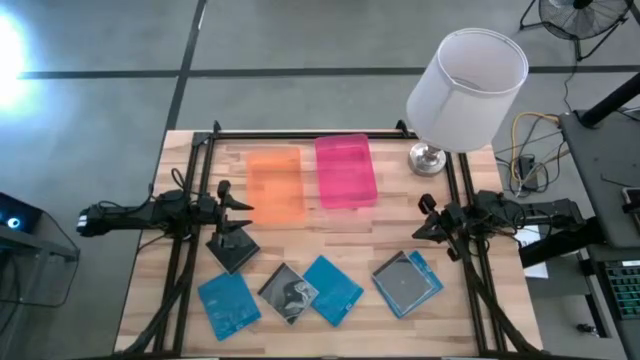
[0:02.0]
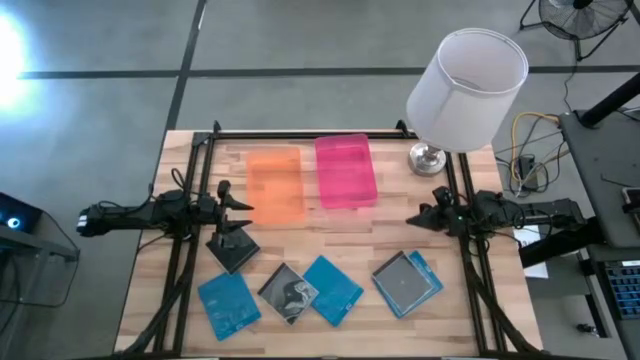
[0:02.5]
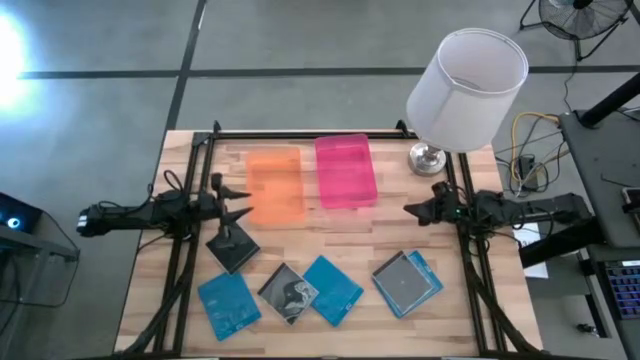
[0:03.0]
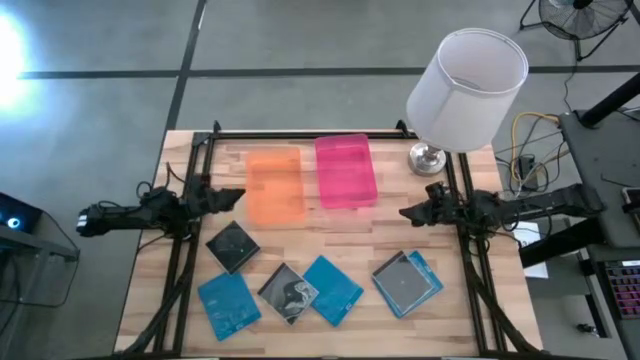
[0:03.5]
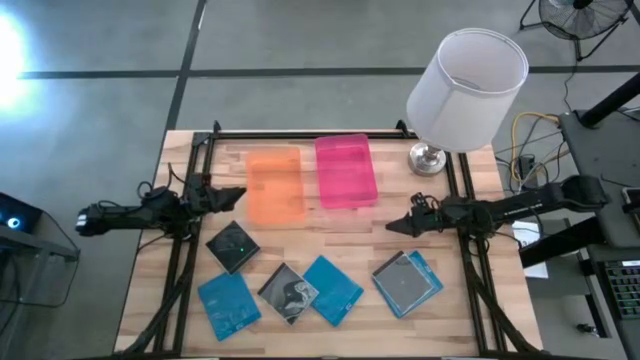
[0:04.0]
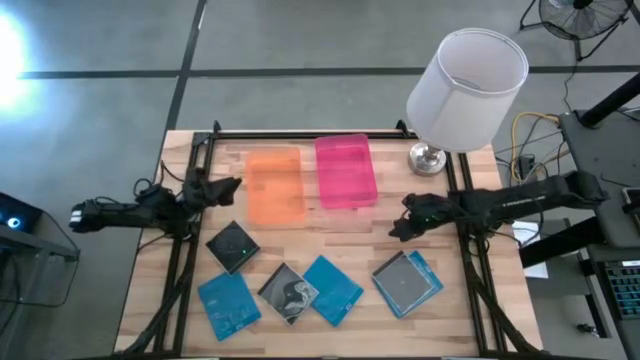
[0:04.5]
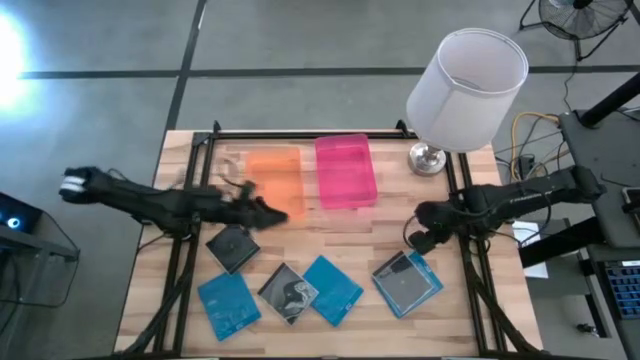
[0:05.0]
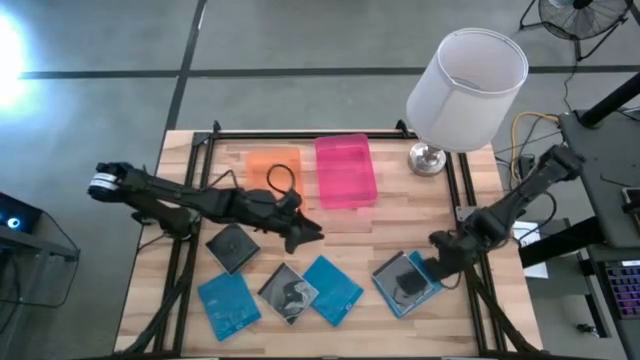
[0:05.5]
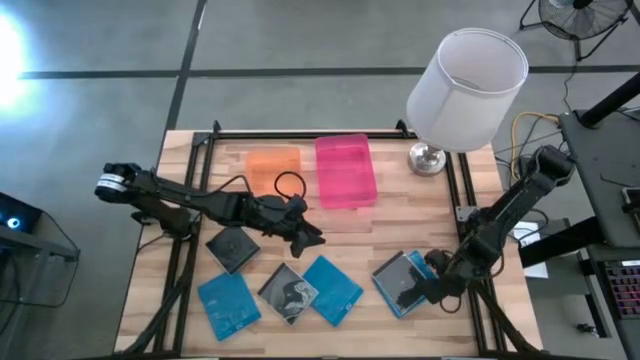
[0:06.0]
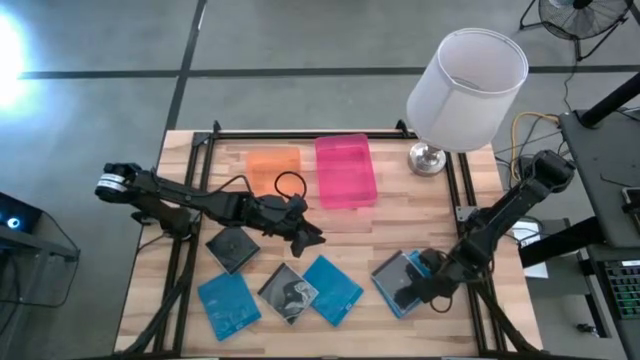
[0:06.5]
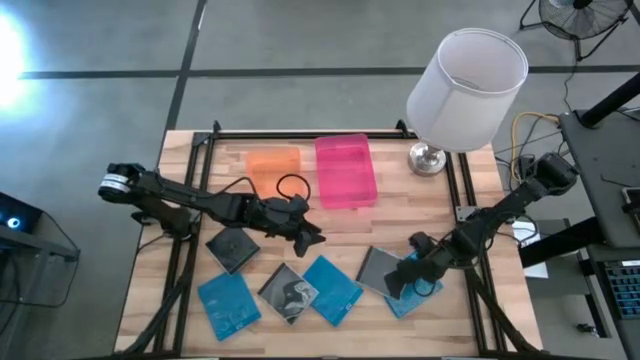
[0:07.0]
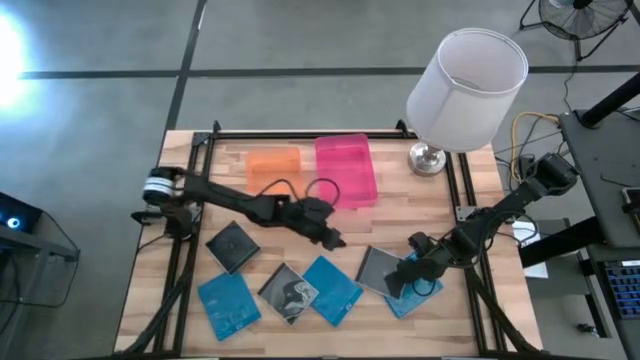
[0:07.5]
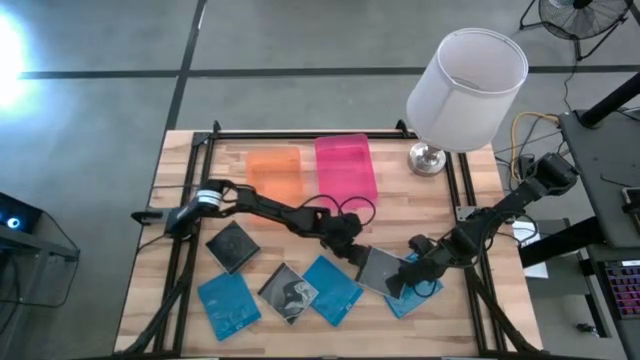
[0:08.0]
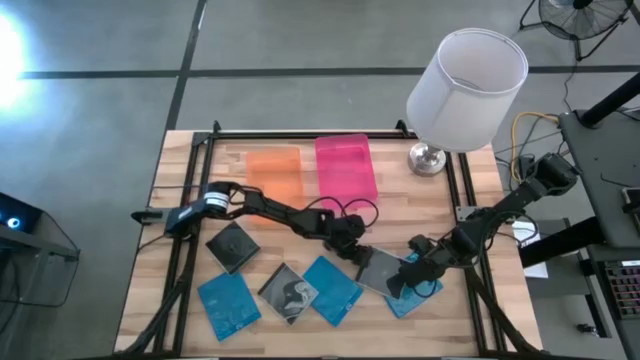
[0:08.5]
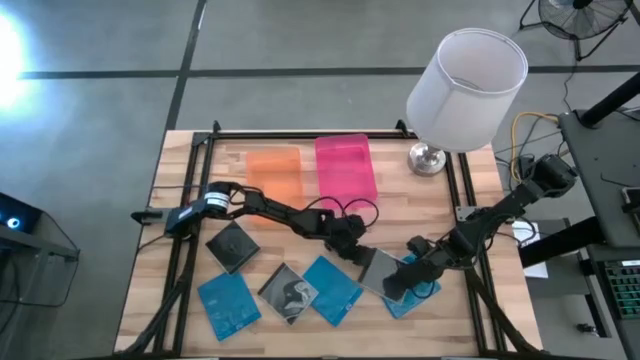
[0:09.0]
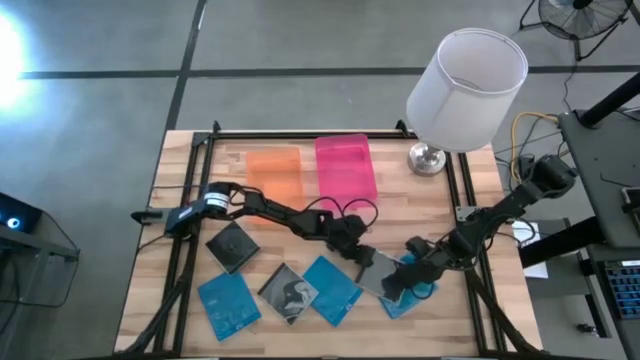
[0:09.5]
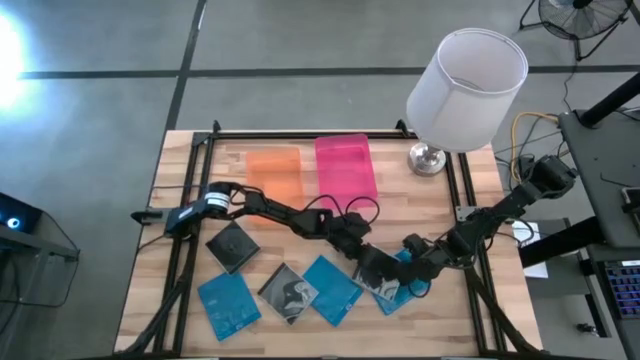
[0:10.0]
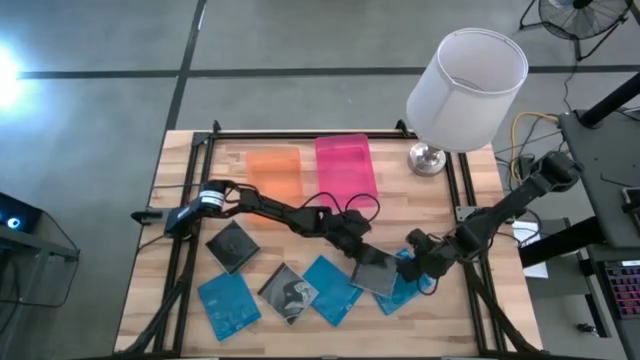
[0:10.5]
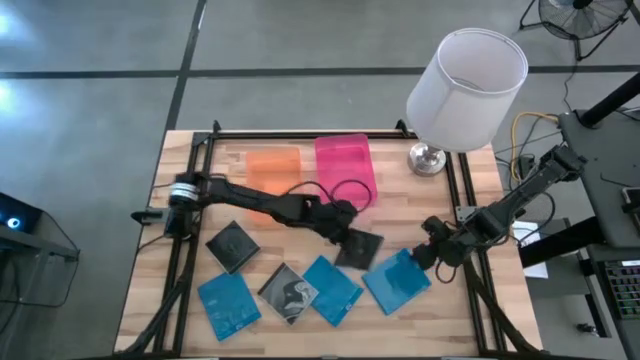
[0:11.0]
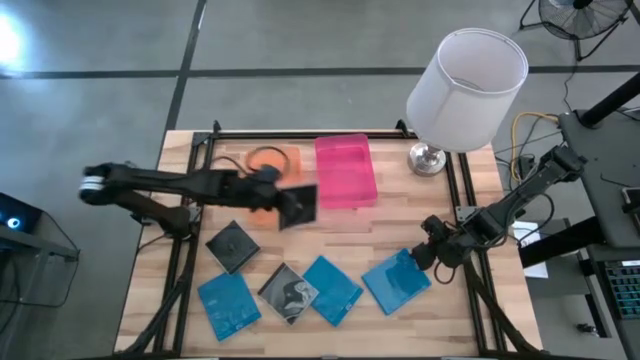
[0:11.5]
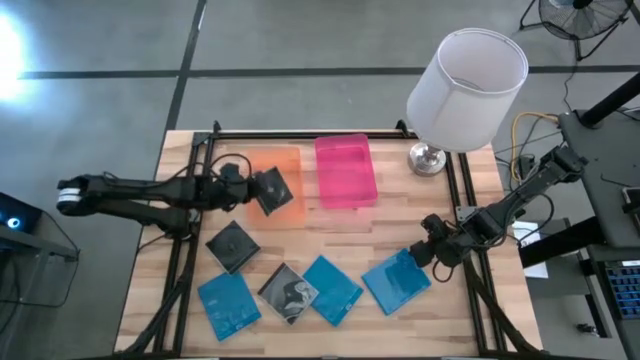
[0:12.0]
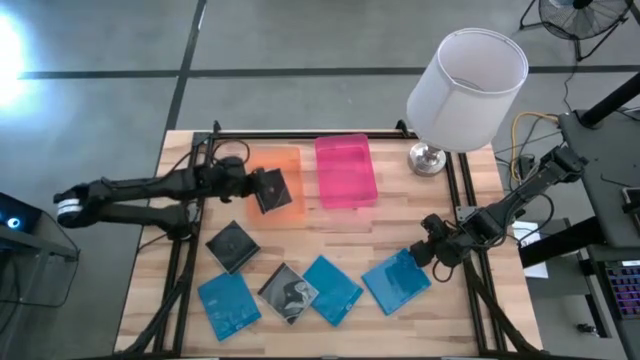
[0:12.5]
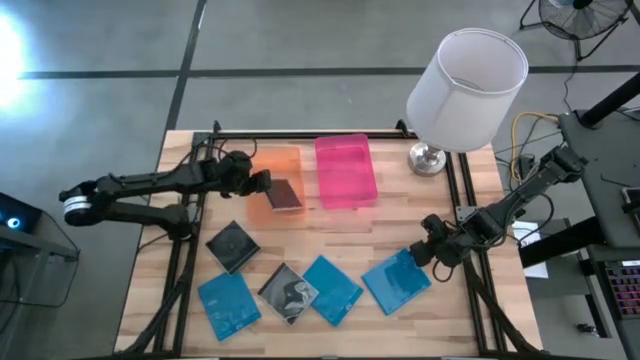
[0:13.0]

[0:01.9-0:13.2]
Task: Pick & place jewel cases by type
Put the bottom right black CD case into the orange bin

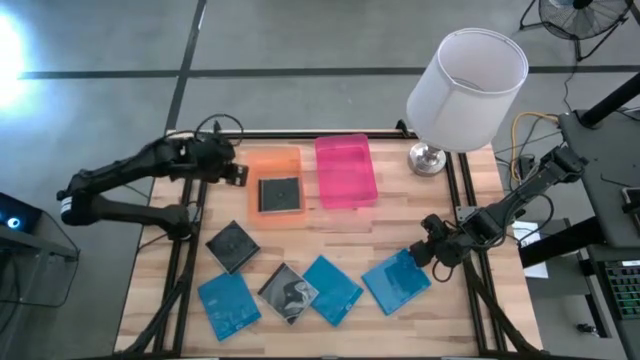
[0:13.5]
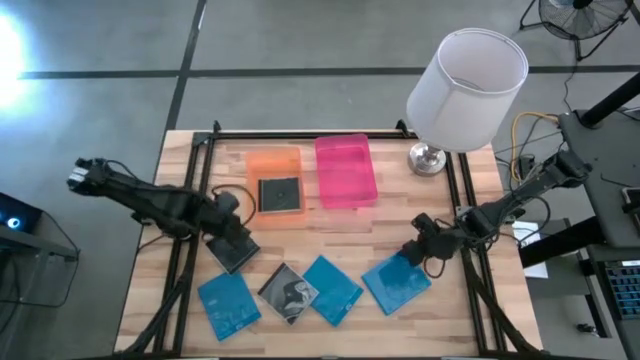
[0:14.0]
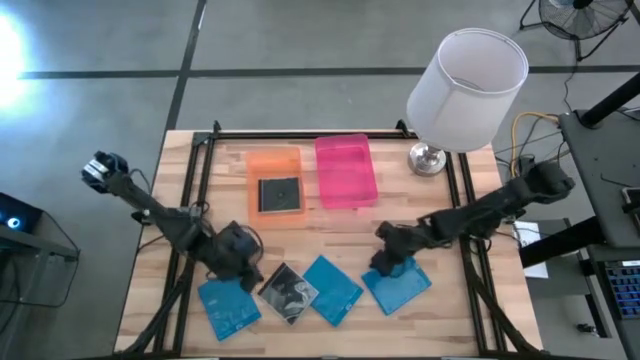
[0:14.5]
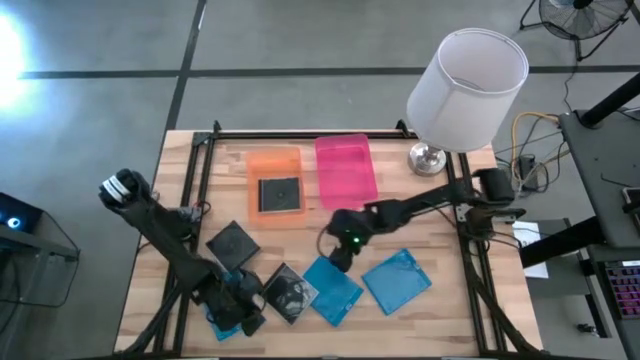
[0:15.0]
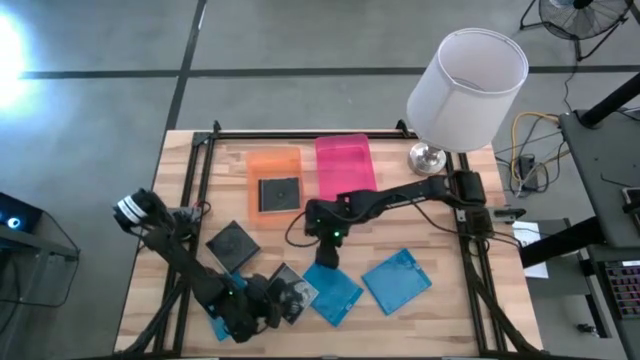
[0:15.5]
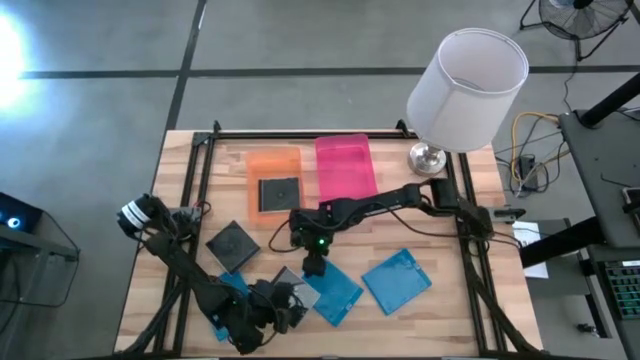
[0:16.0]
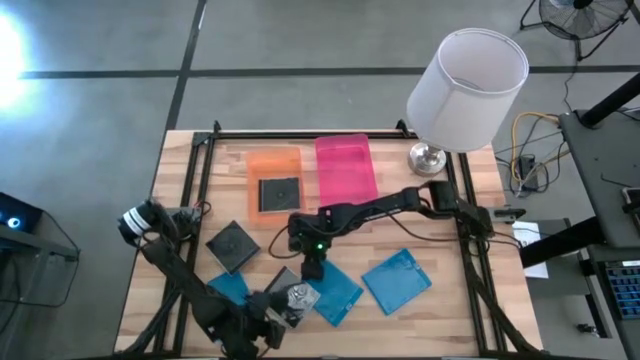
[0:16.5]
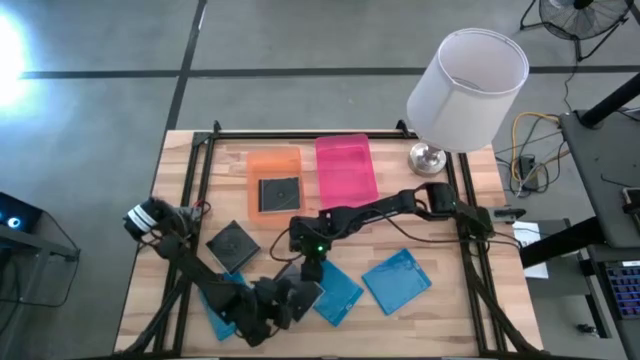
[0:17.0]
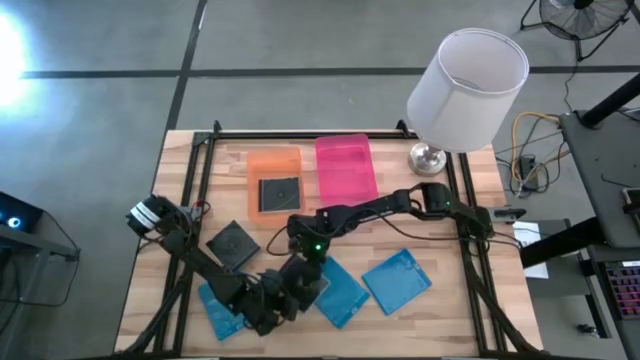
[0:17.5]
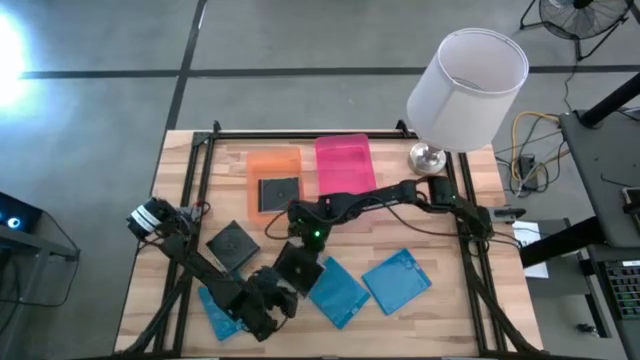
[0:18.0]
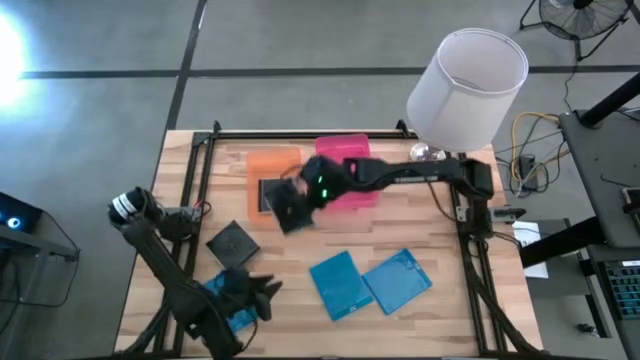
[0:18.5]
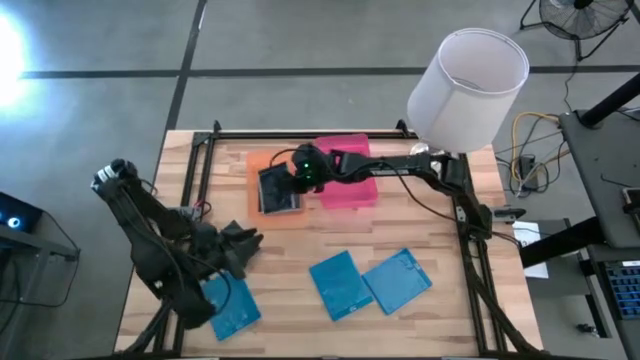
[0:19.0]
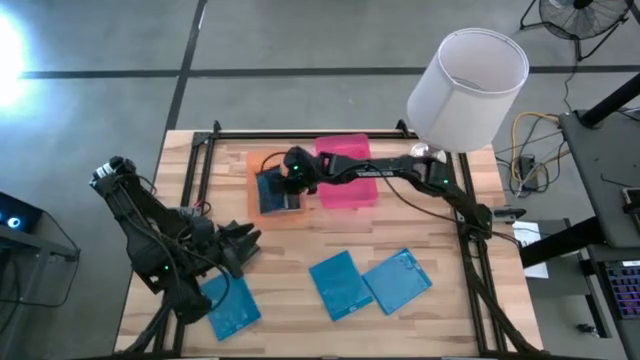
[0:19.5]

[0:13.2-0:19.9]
Put the bottom black CD case into the orange bin

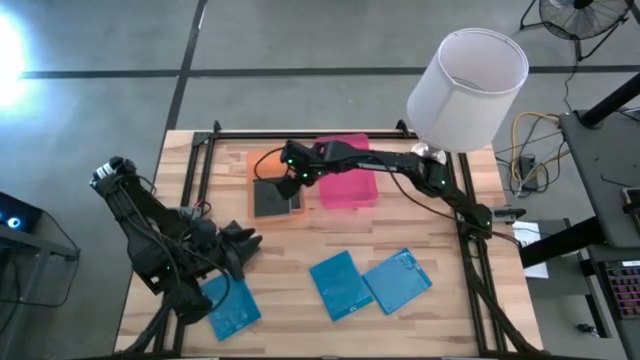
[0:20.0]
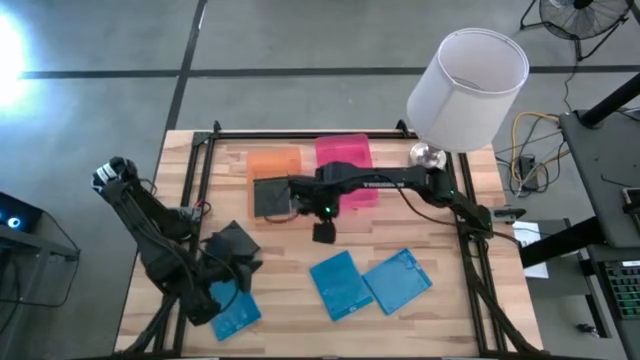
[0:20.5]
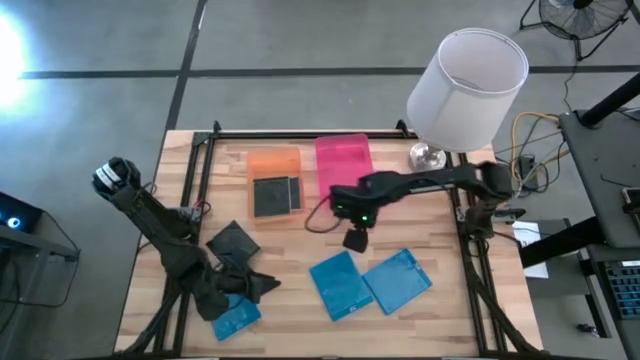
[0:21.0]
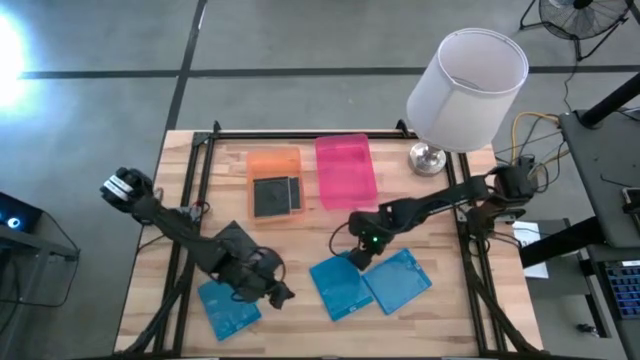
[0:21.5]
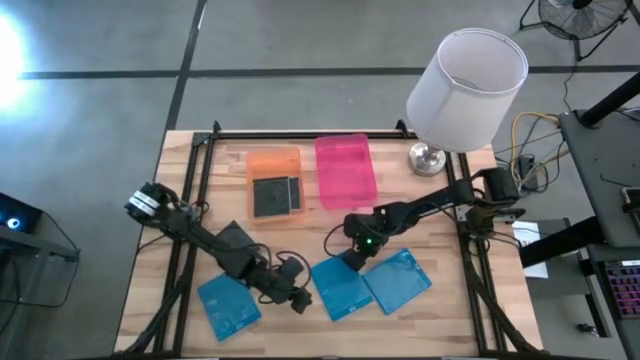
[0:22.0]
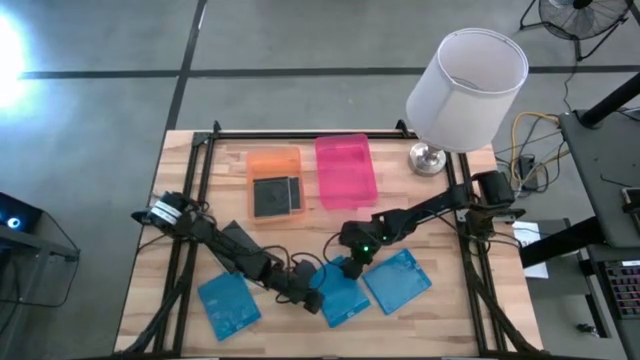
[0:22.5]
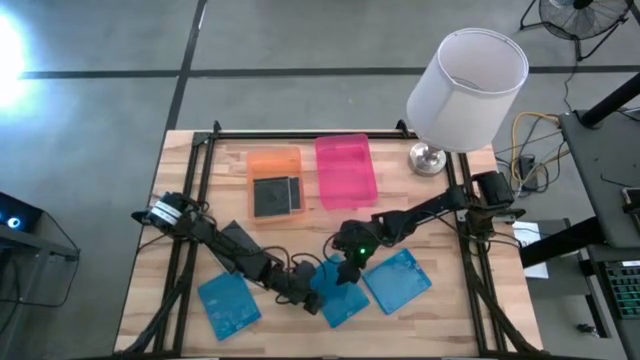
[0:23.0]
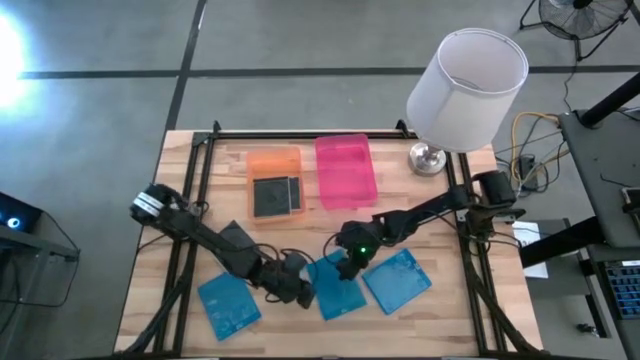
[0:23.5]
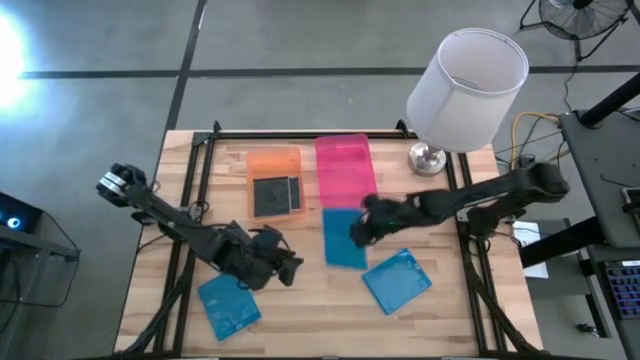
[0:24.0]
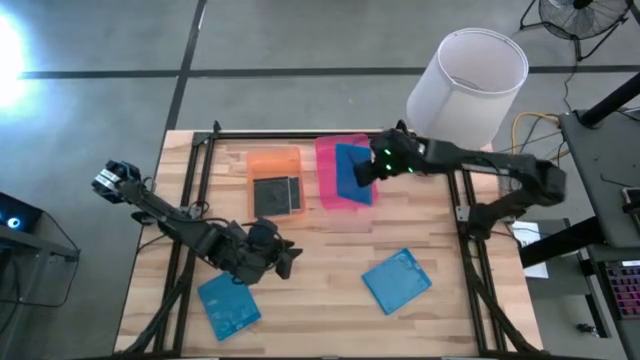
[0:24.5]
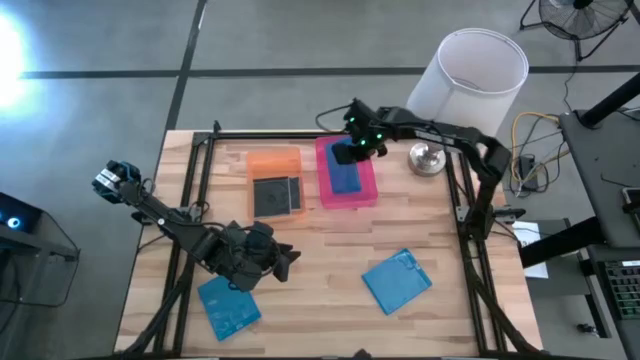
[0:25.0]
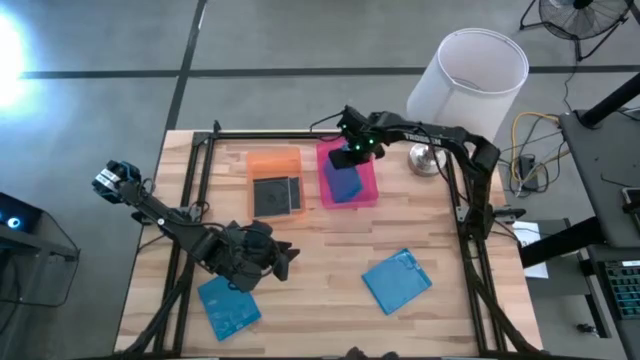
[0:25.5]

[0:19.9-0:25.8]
Put the middle blue CD case into the pink bin
